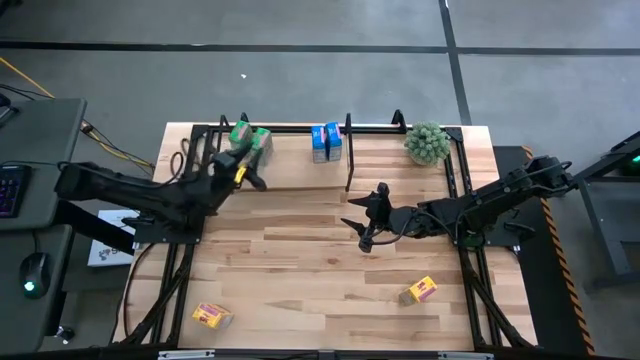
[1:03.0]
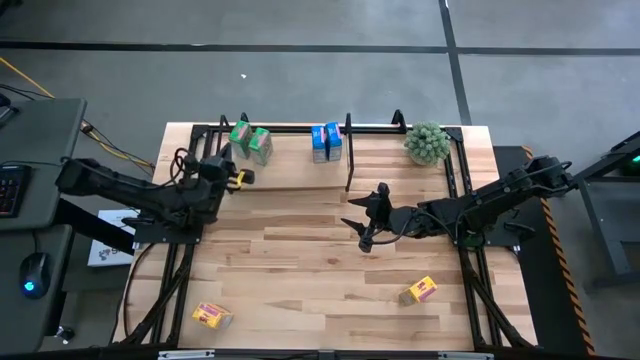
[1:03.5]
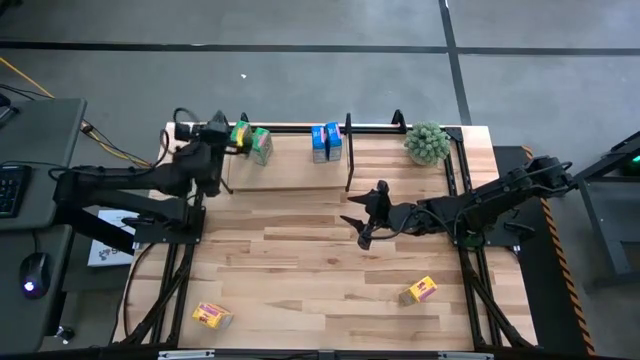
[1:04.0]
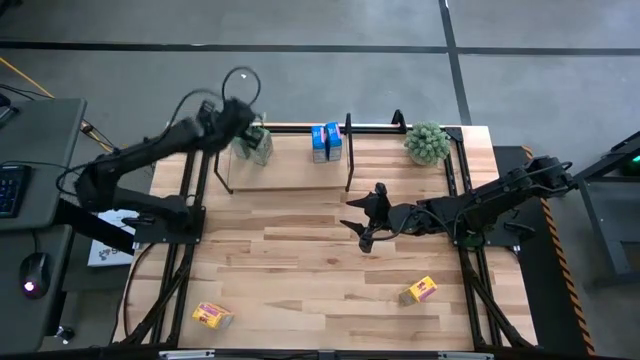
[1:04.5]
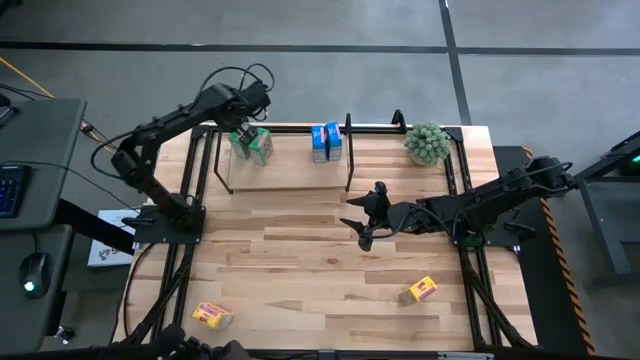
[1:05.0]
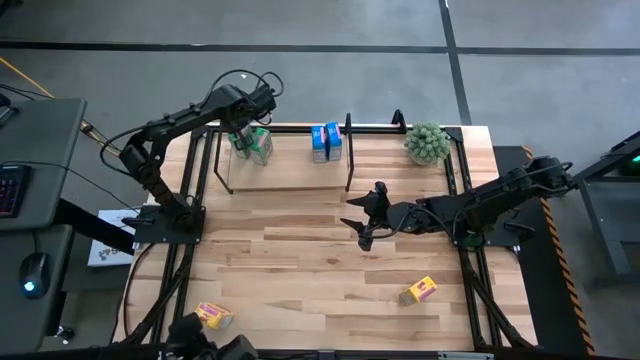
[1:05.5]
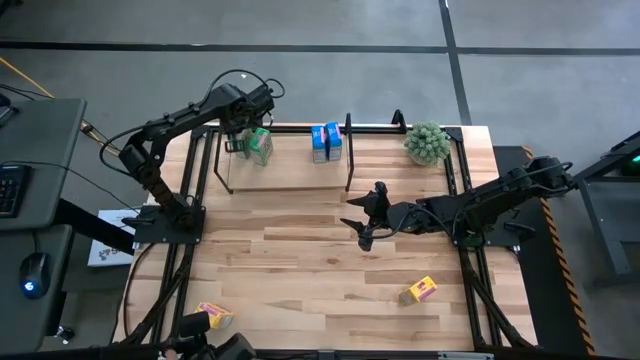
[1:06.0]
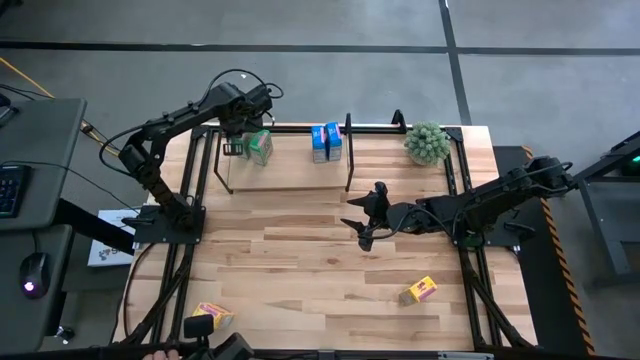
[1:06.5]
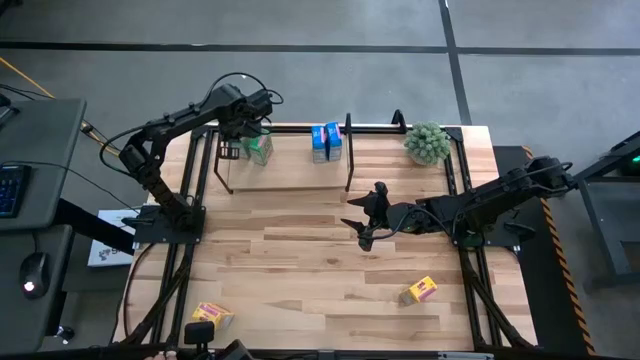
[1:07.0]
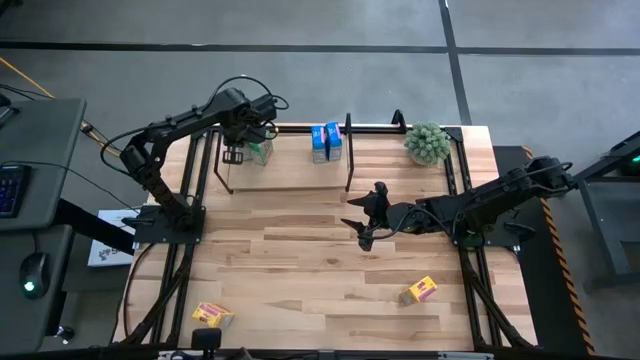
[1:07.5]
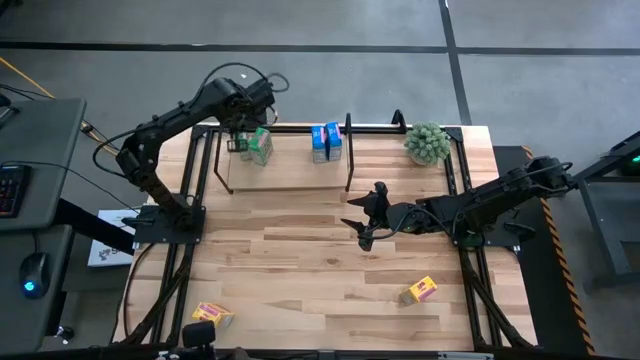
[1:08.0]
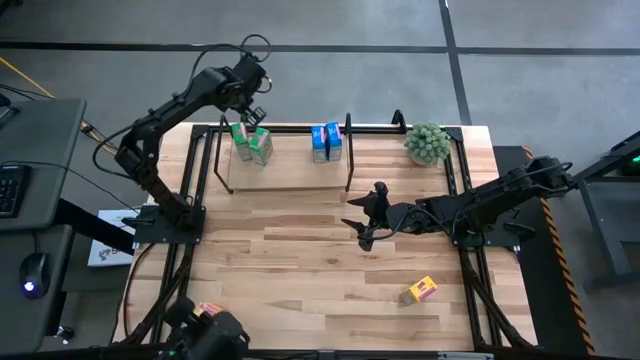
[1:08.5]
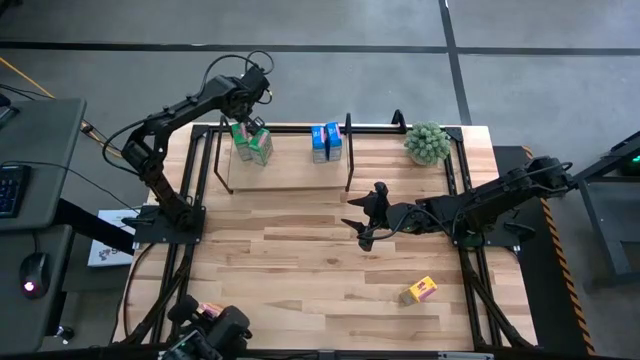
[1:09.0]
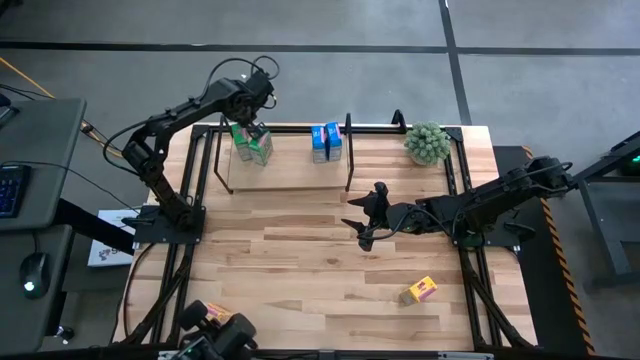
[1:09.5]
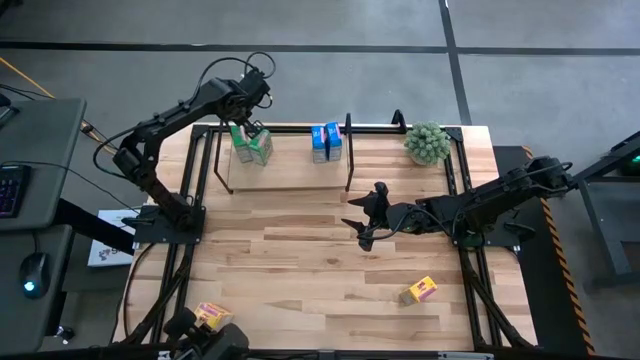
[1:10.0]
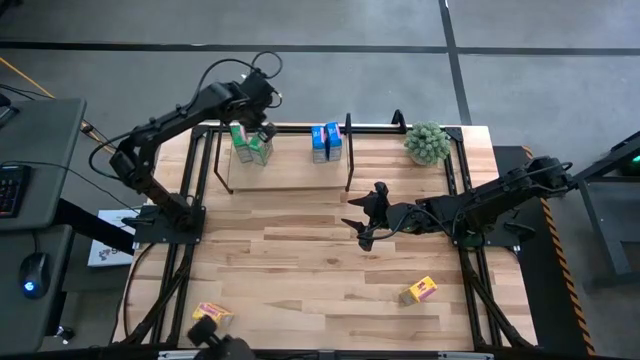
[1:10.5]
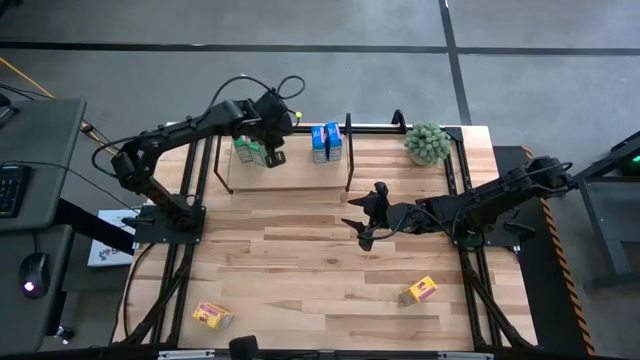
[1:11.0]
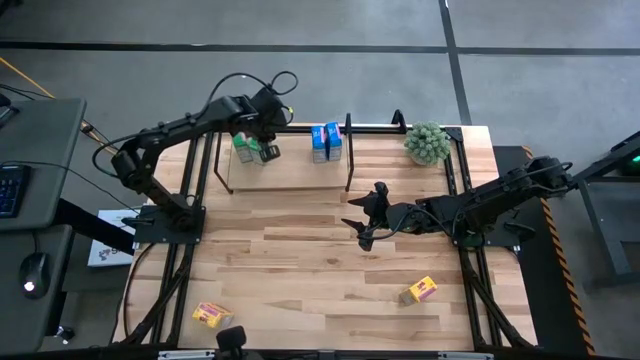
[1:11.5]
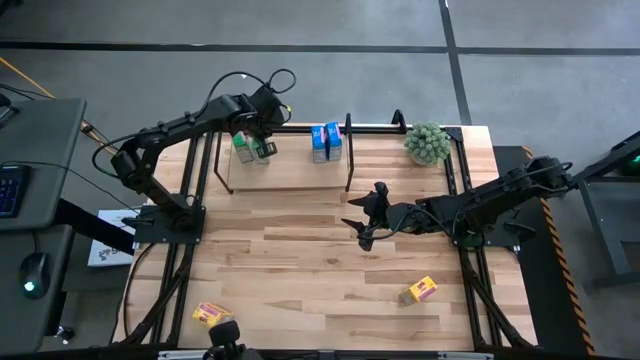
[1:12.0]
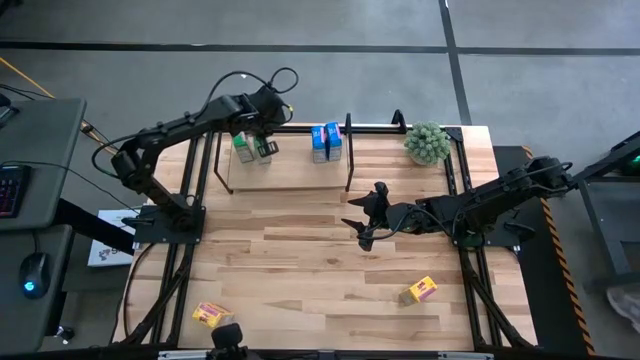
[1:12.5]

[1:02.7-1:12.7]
Task: Stack cereal on shelf
Adjust the green cereal boxes on the shelf

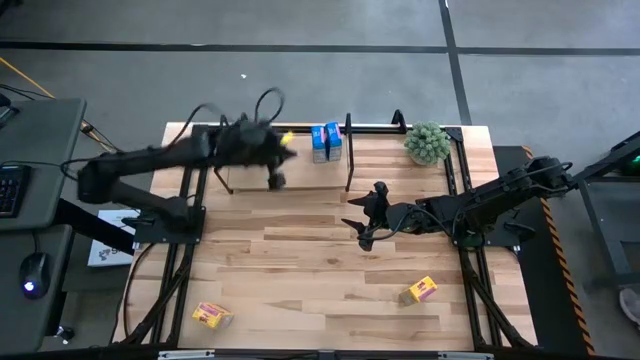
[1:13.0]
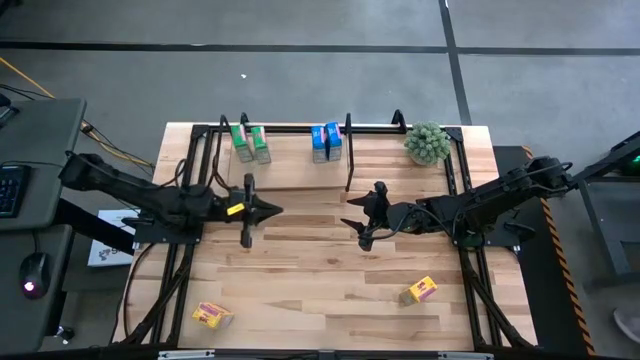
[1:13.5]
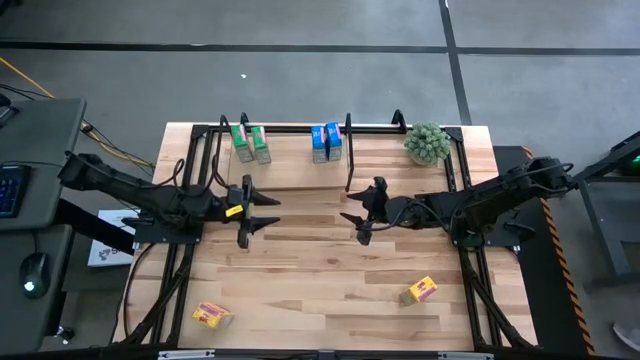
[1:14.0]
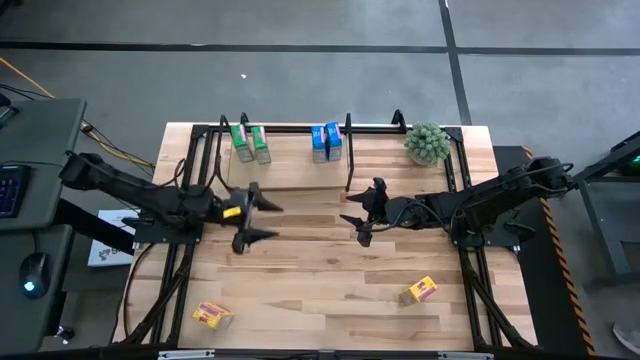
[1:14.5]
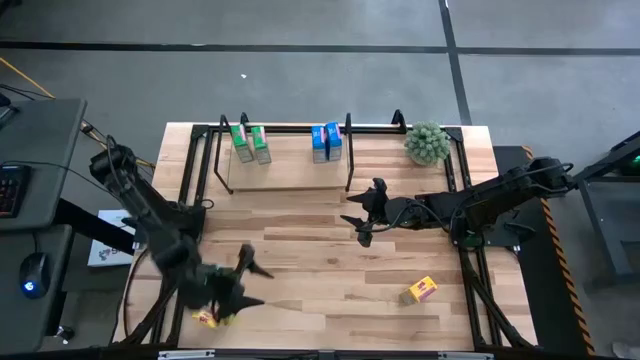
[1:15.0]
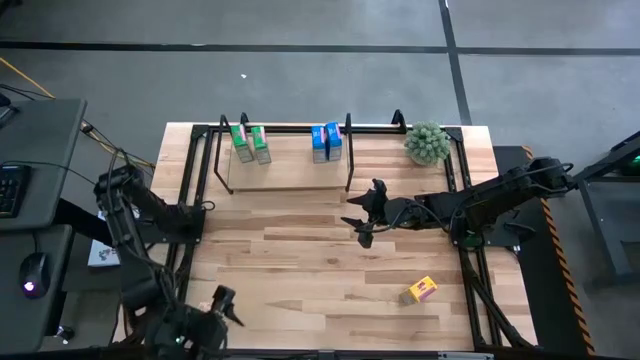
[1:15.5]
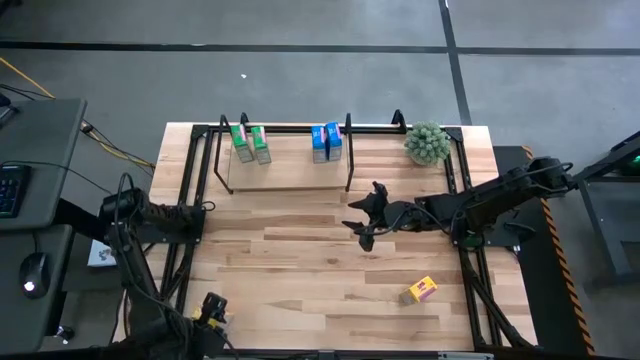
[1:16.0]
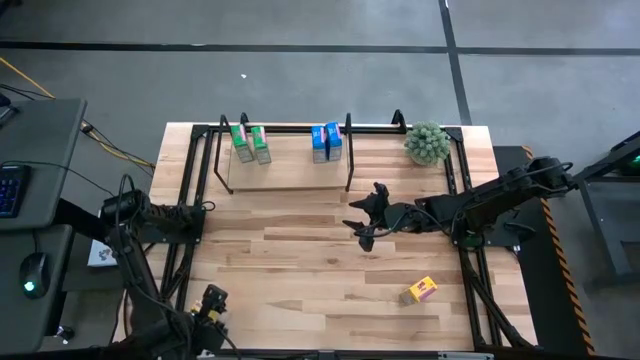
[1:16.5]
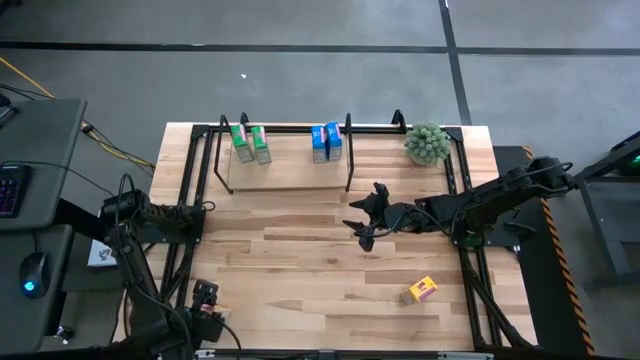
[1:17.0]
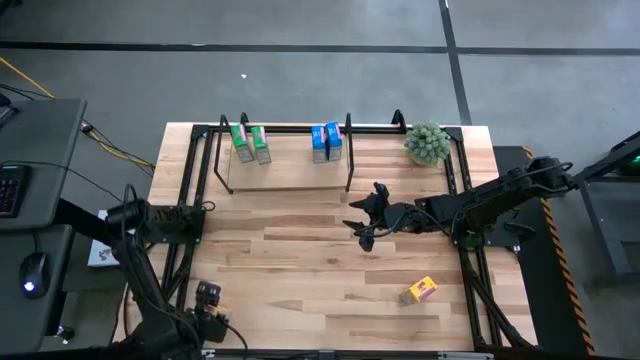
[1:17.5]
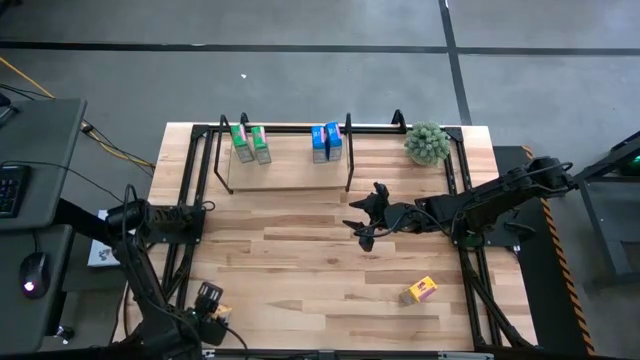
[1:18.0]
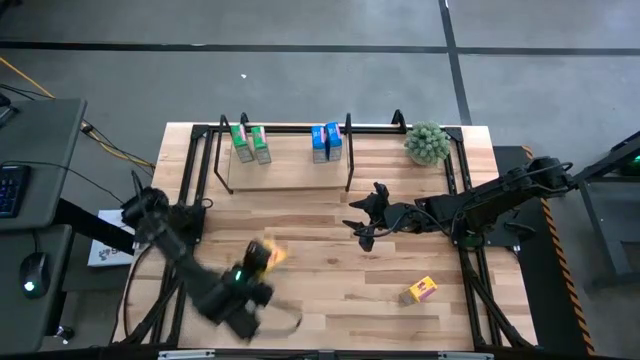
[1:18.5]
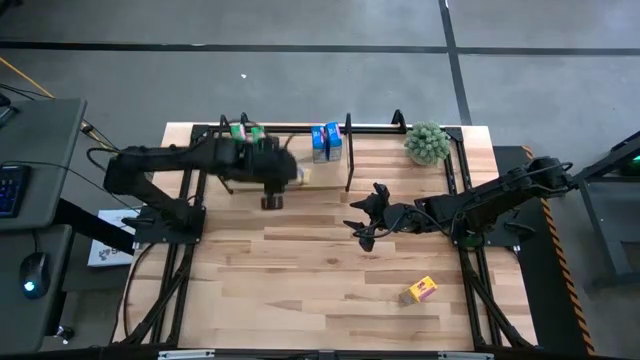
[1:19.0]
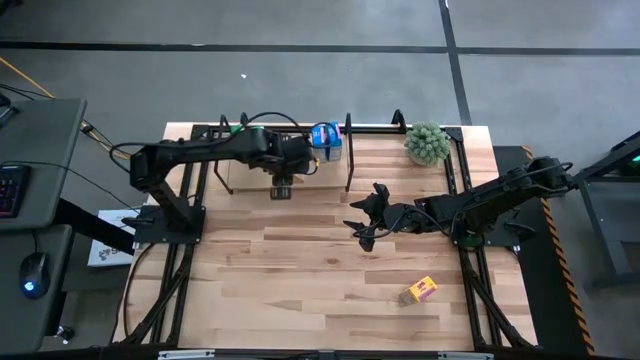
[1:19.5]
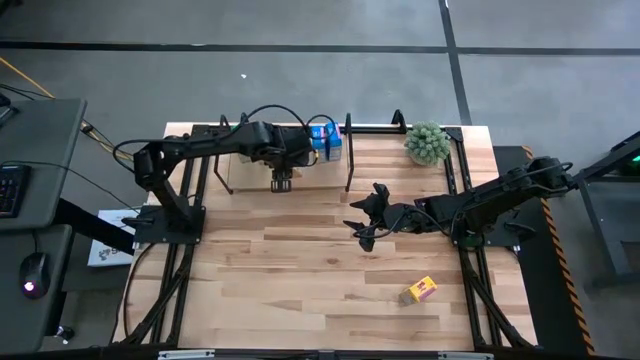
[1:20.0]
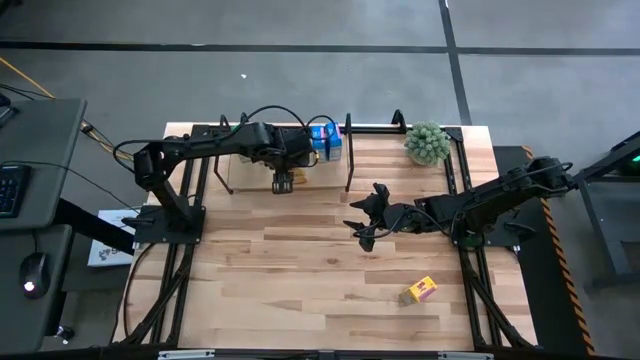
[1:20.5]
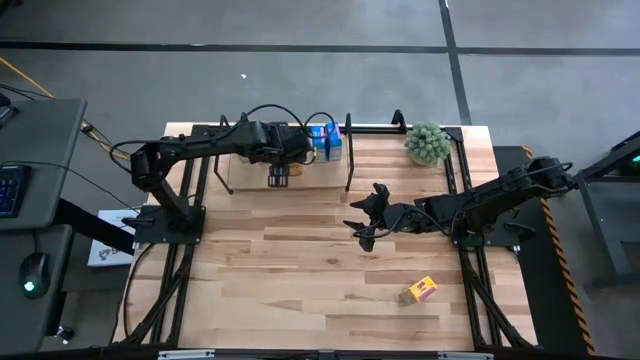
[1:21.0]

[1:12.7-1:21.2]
Put the left yellow cereal box on the shelf

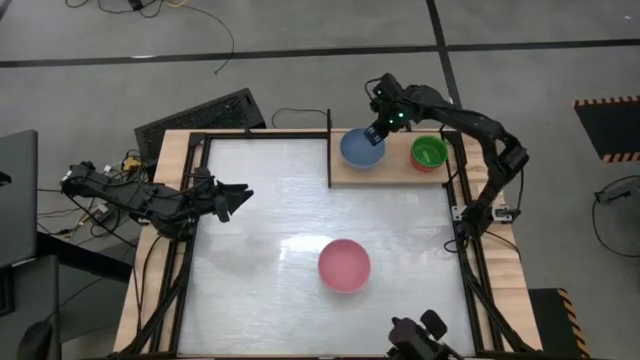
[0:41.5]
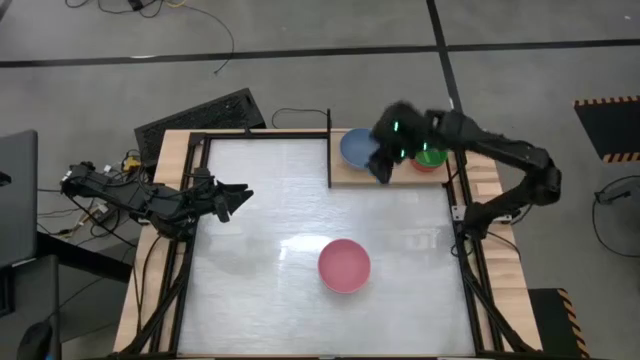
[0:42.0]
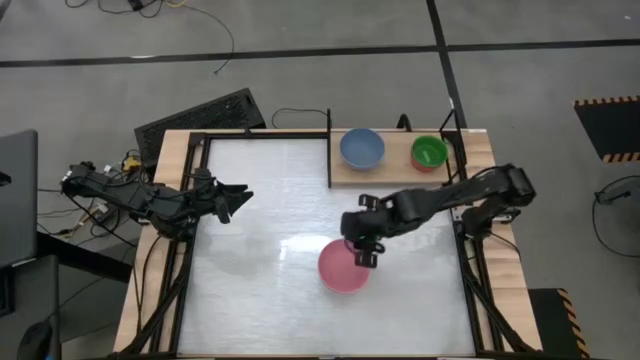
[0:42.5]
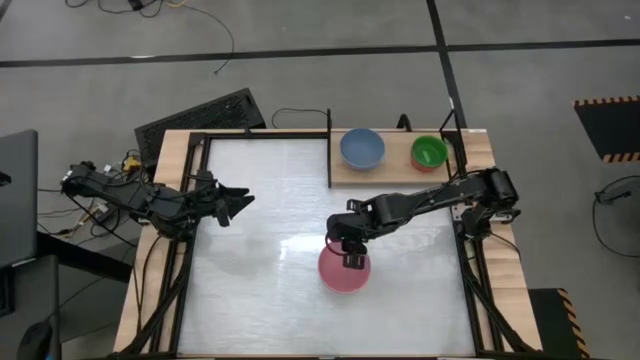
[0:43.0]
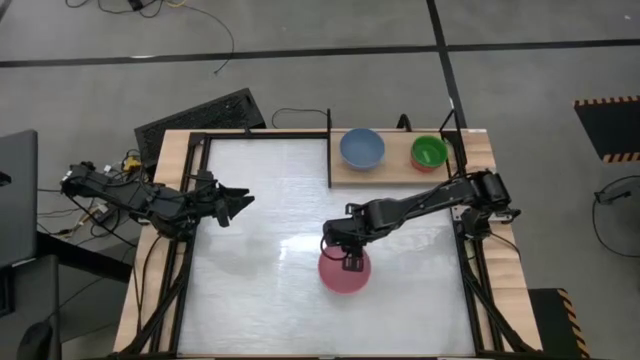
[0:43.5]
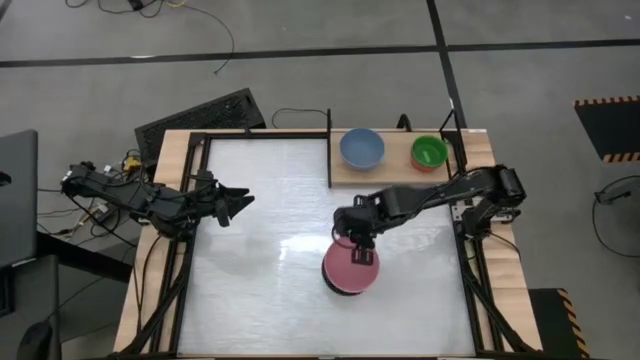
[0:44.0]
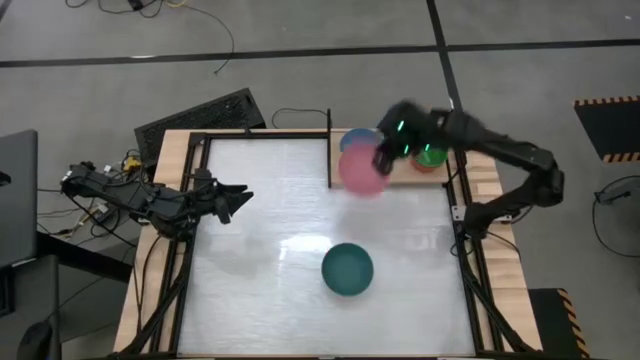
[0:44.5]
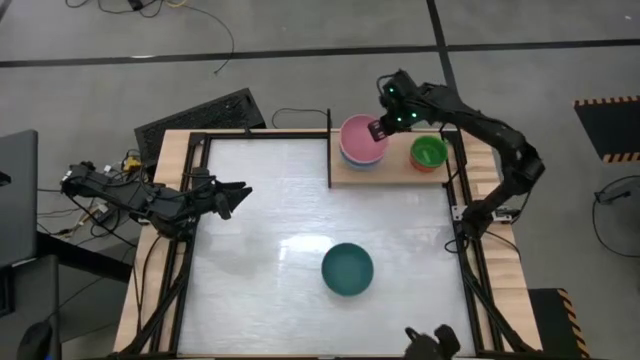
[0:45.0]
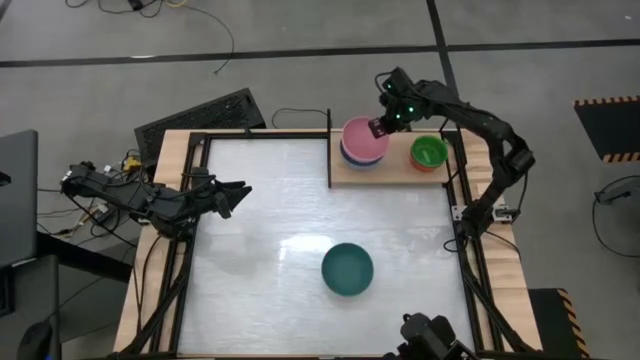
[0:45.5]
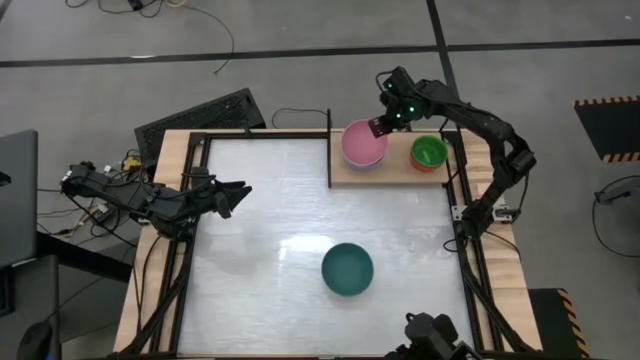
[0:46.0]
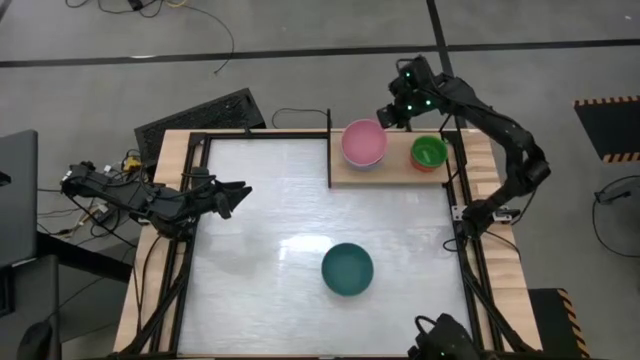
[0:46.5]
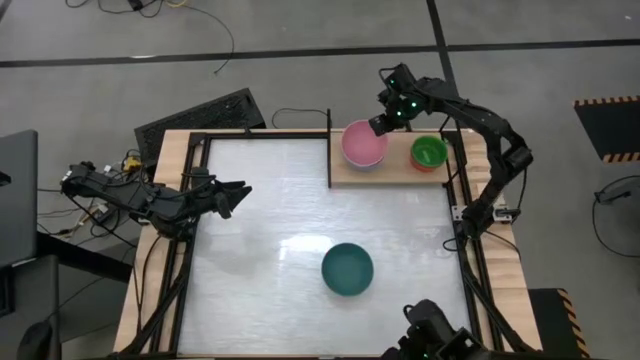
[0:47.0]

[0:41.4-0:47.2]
Task: Place and stack bowls onto a shelf
Stack the pink bowl on top of the blue bowl on the shelf
